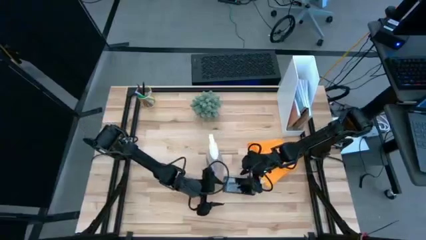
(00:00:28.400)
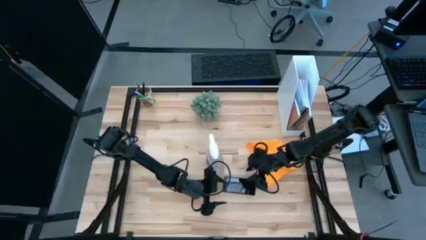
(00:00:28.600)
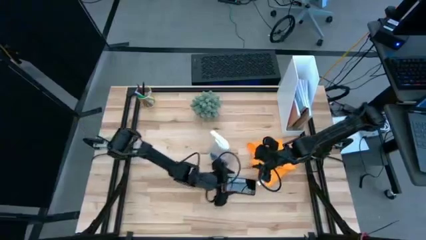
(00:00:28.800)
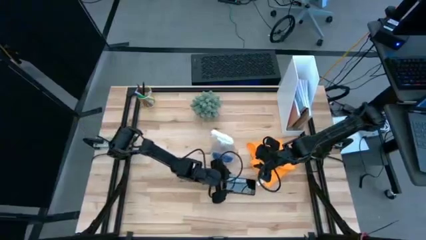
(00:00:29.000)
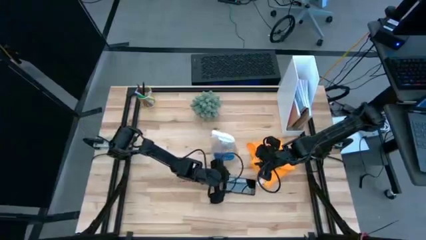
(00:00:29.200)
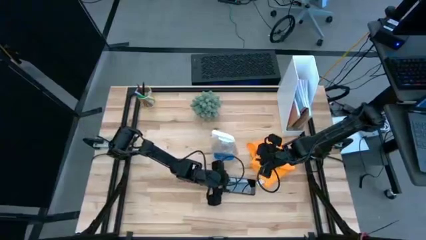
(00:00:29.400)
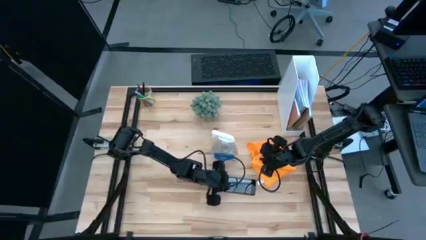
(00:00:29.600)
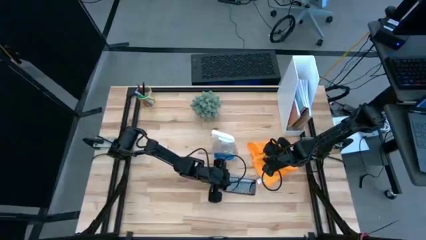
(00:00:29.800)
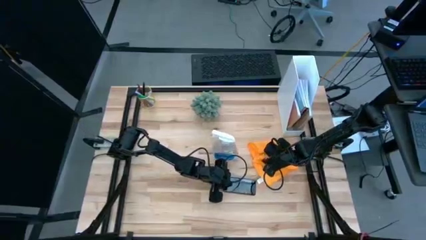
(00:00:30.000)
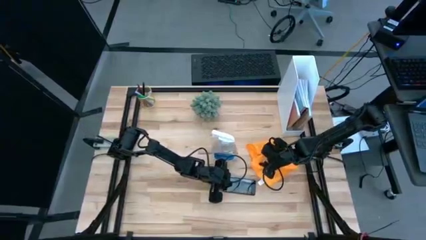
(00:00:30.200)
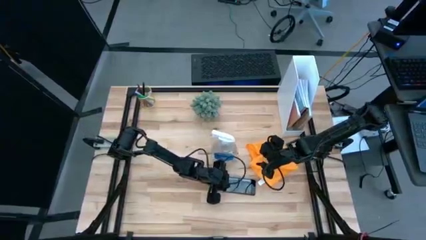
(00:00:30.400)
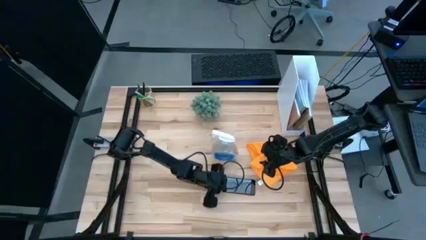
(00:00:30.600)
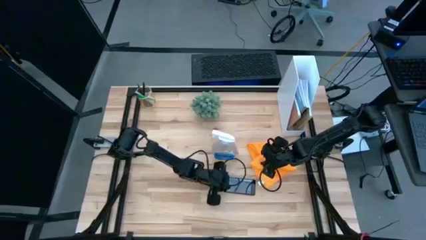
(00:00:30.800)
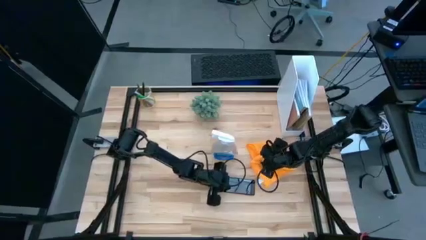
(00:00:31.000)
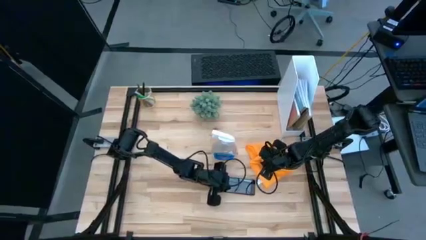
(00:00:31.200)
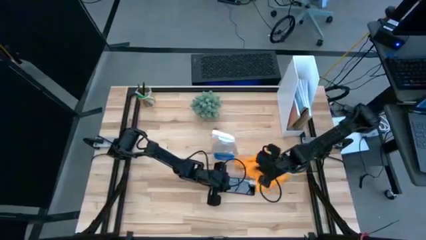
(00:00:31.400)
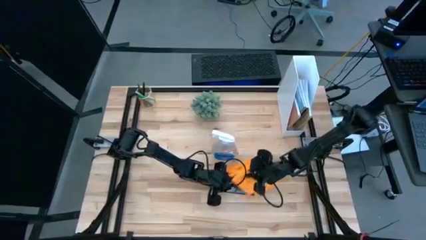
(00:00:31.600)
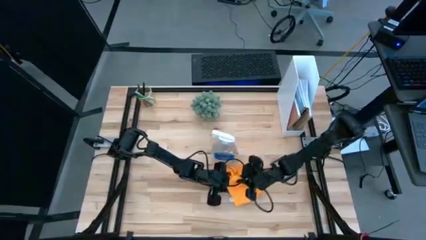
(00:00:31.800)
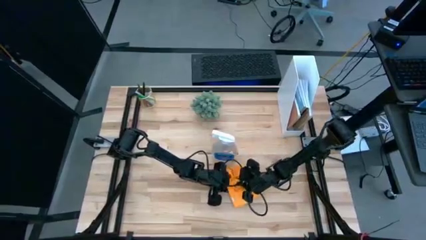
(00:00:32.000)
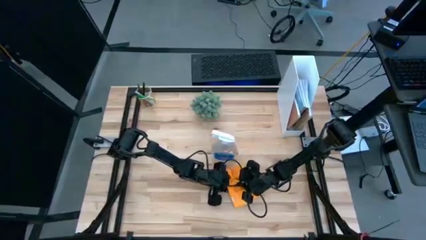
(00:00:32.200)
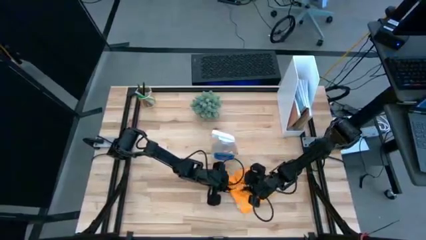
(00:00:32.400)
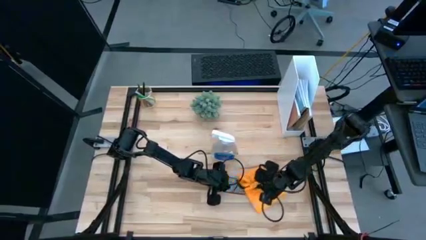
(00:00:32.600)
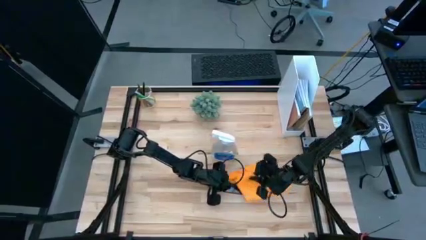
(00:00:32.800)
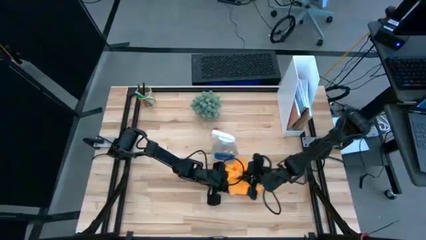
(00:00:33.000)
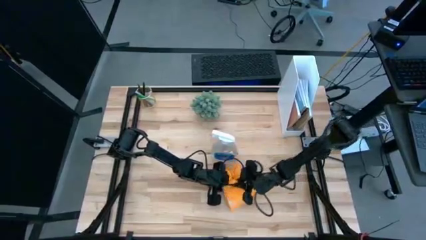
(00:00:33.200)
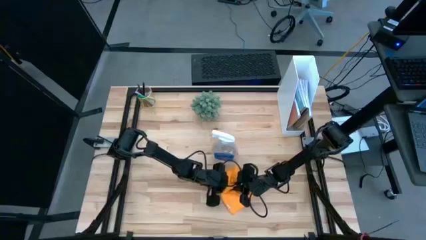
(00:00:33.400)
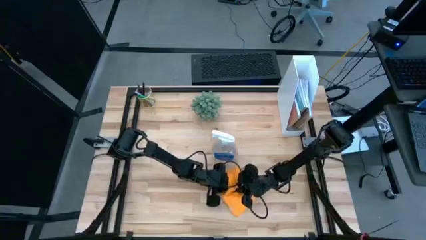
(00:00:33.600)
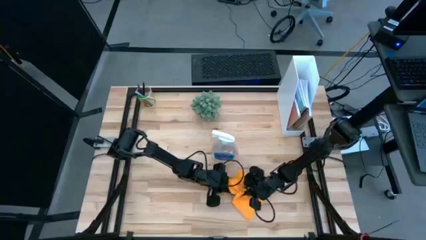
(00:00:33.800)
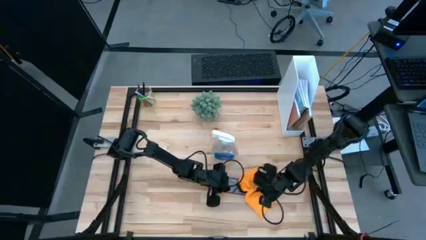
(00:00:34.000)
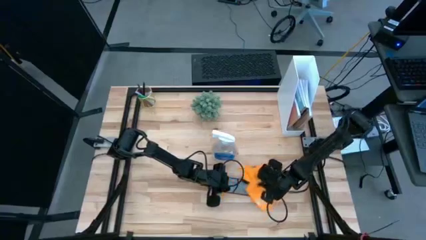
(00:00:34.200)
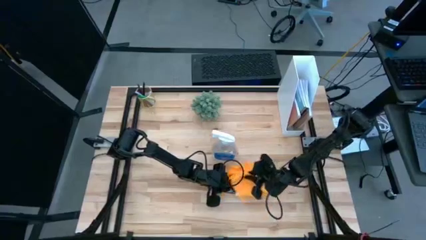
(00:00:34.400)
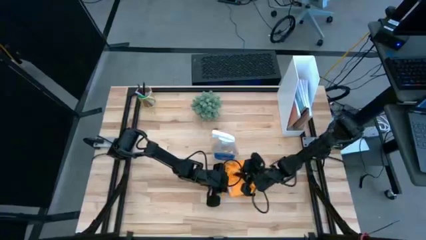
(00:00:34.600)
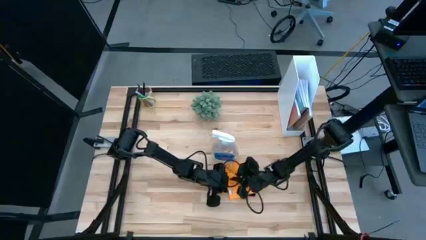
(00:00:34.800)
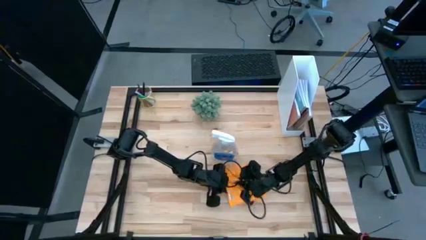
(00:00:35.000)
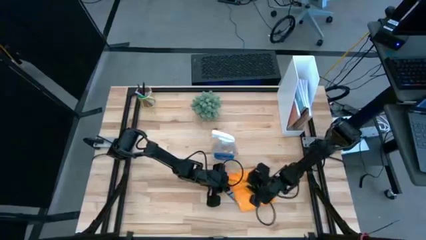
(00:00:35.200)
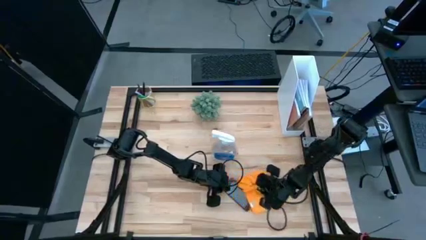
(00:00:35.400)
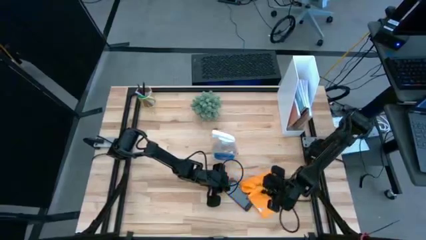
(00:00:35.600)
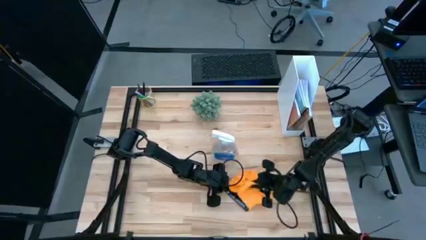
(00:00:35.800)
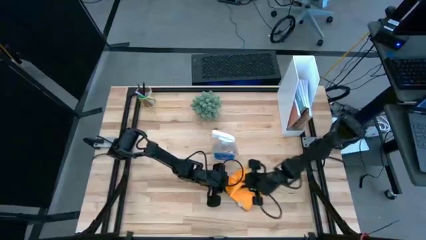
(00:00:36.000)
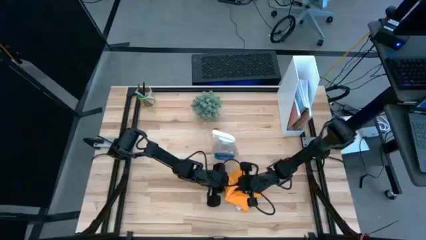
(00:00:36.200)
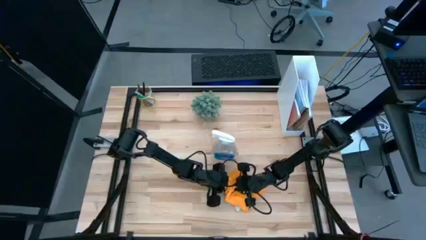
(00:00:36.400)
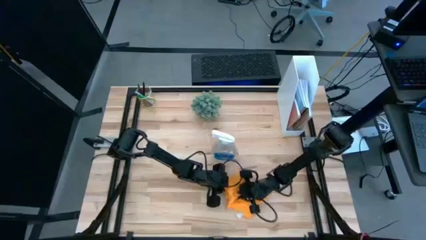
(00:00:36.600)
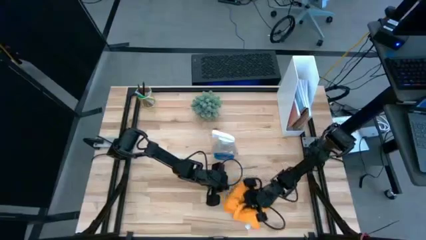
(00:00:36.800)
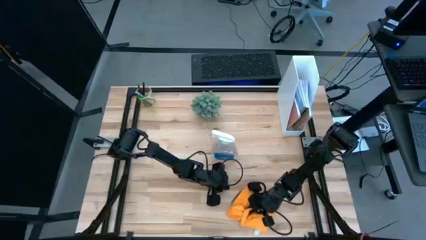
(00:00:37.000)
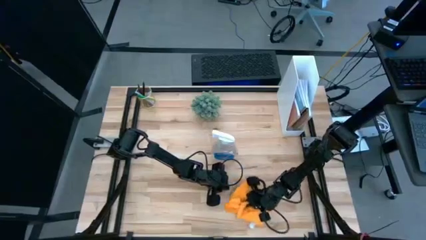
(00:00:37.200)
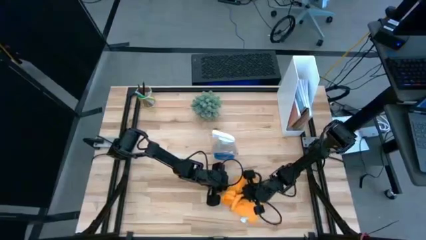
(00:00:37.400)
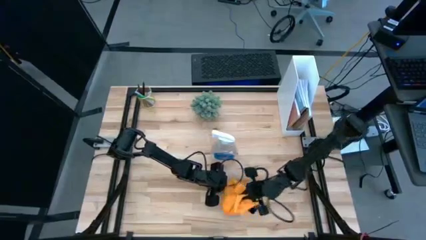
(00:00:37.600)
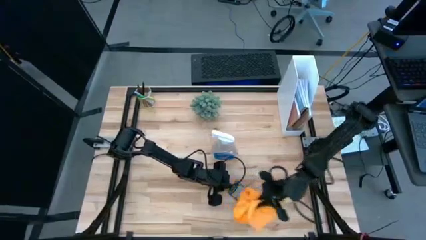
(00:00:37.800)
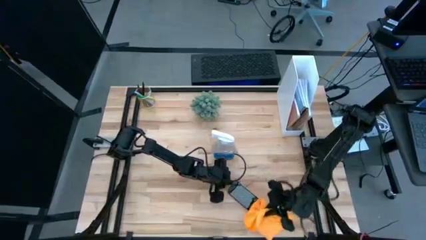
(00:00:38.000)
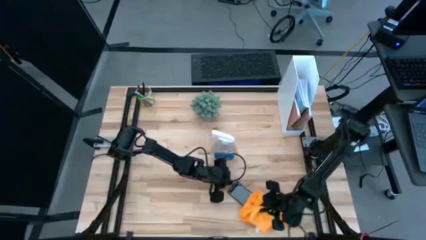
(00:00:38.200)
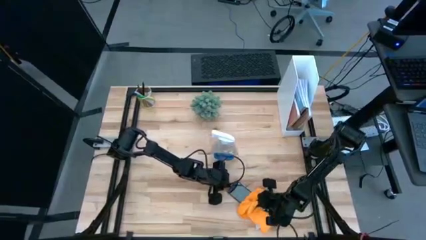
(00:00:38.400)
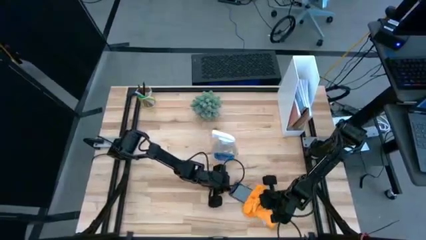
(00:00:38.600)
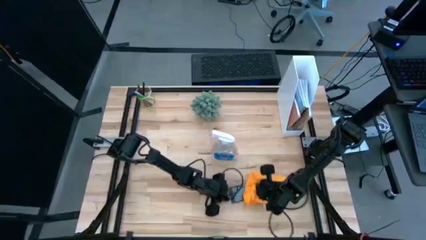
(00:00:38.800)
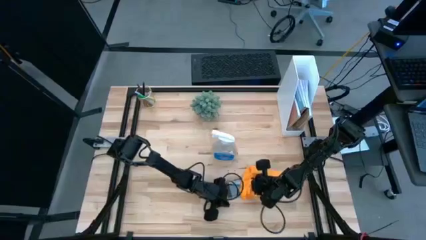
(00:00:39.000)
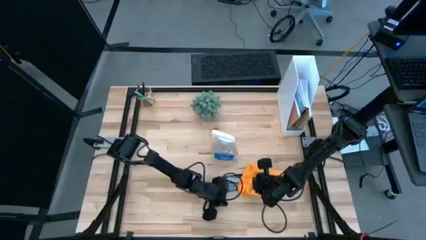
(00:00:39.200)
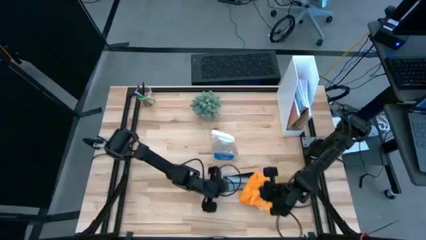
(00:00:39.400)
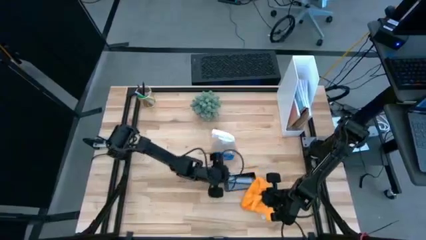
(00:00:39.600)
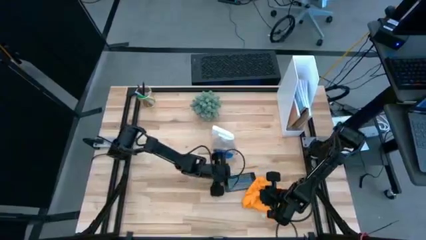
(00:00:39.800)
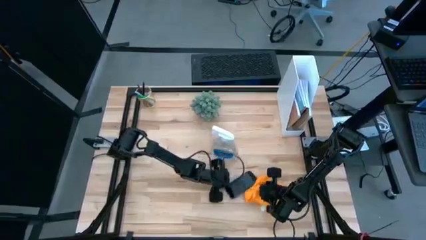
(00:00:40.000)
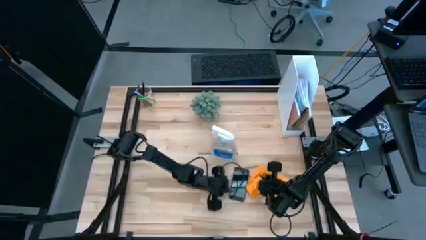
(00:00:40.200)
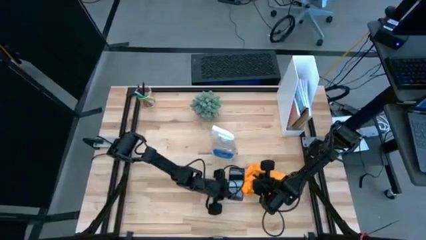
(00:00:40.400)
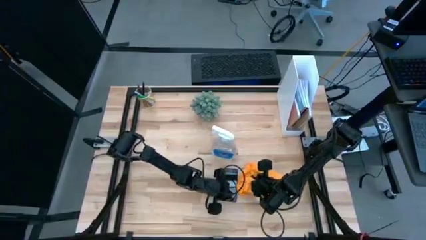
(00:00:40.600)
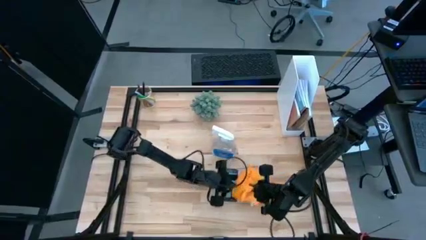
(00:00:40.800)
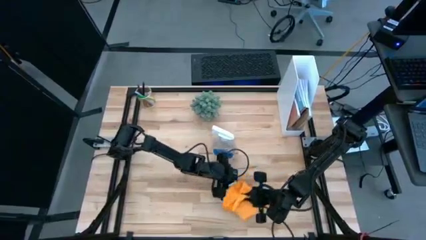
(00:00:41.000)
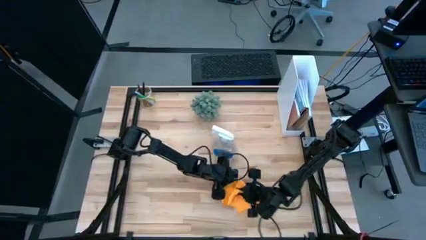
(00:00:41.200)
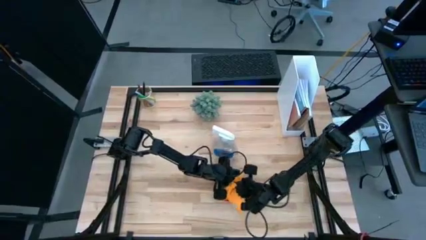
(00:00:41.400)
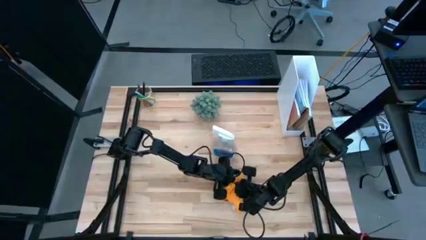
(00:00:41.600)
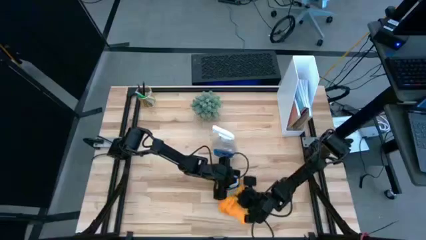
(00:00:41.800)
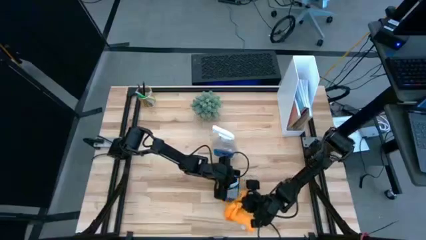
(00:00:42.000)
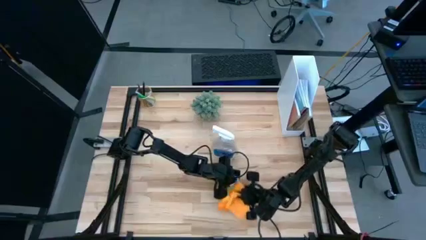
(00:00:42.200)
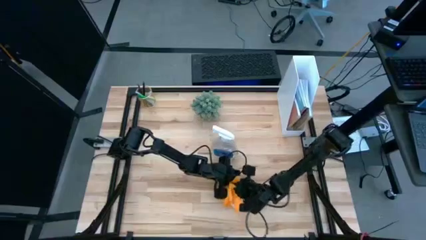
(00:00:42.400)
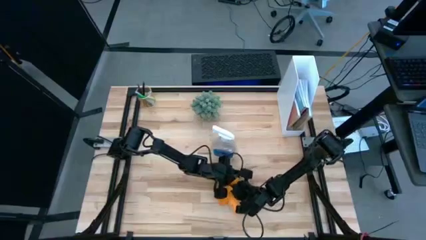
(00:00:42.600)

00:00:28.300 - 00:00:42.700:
Task: Apply microfiber cloth
Wipe the front of the cellphone with the yellow microfiber cloth
